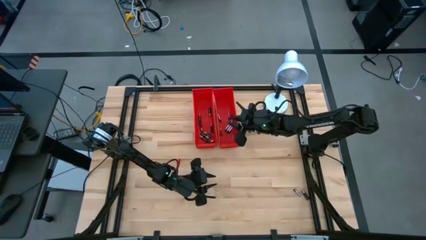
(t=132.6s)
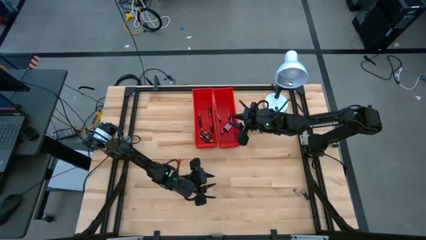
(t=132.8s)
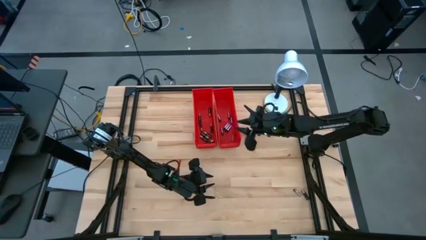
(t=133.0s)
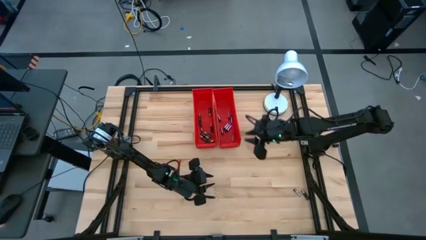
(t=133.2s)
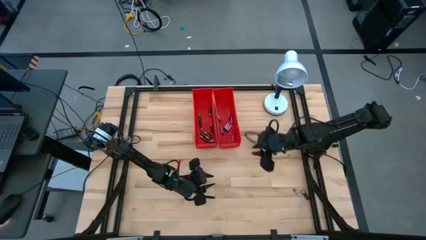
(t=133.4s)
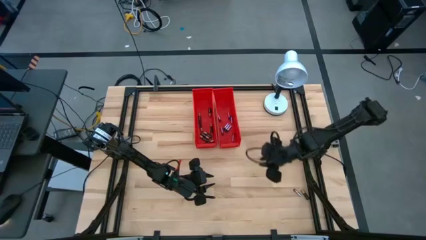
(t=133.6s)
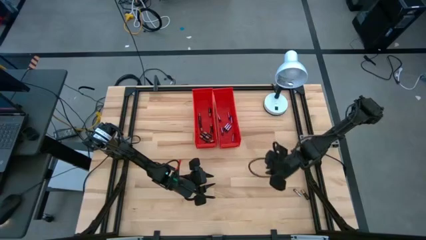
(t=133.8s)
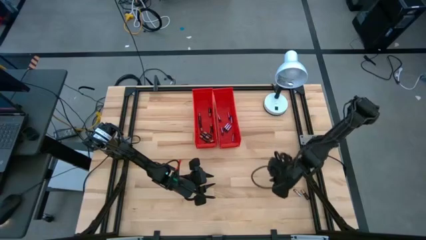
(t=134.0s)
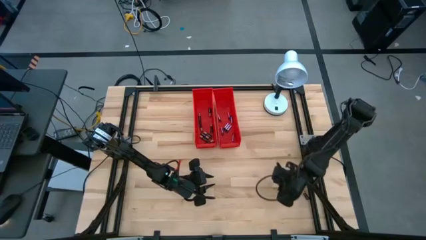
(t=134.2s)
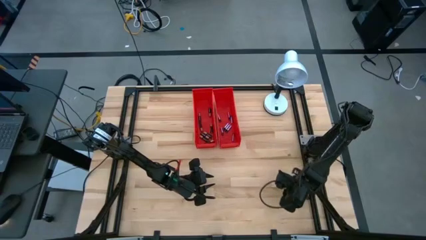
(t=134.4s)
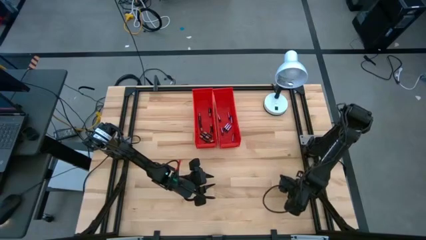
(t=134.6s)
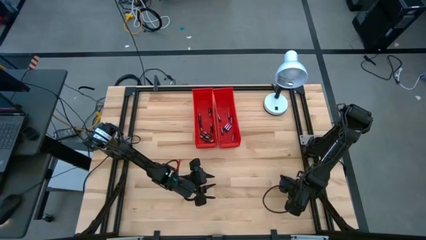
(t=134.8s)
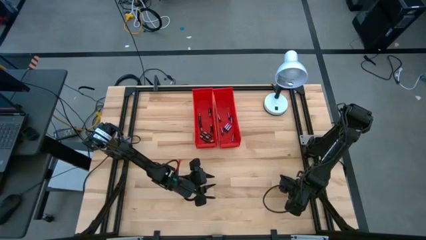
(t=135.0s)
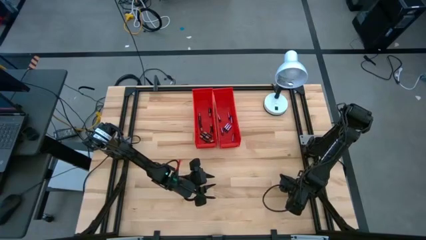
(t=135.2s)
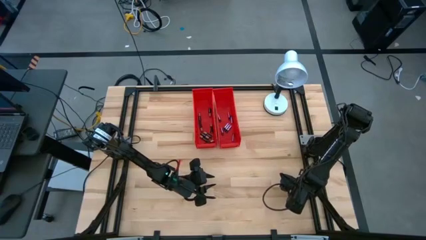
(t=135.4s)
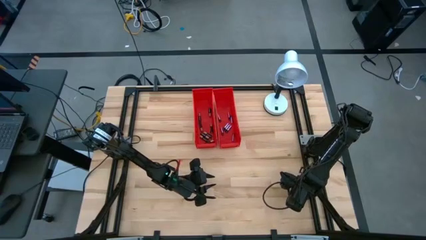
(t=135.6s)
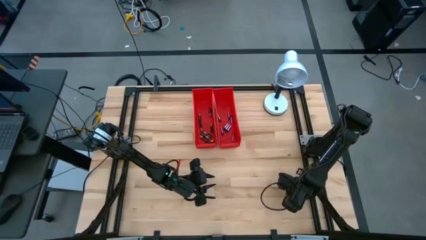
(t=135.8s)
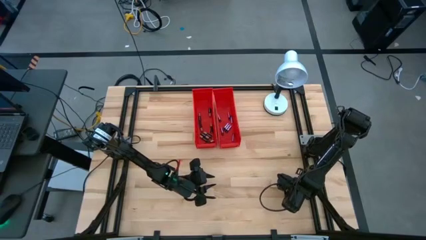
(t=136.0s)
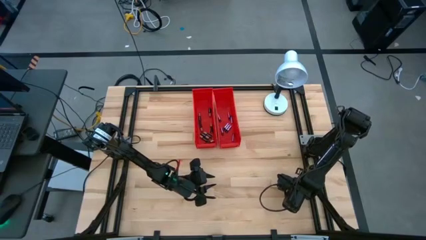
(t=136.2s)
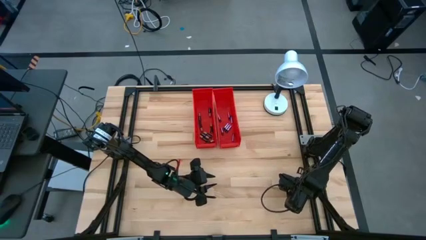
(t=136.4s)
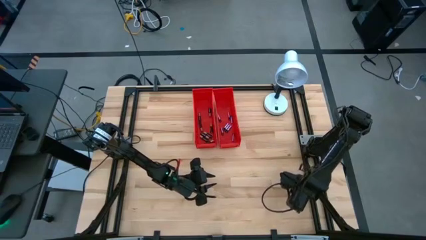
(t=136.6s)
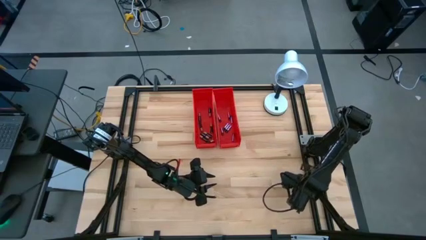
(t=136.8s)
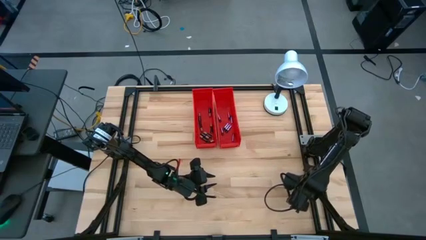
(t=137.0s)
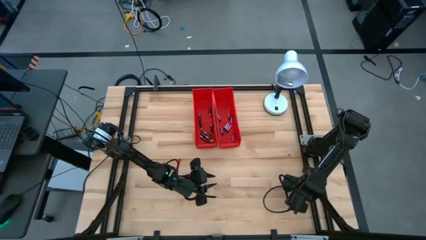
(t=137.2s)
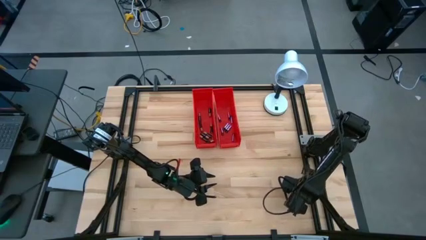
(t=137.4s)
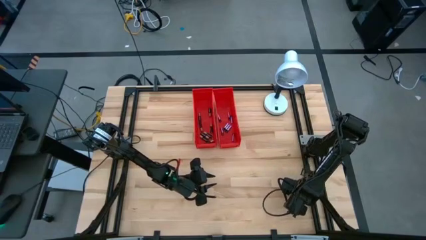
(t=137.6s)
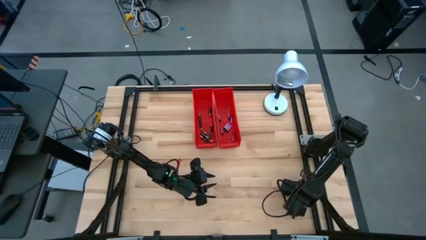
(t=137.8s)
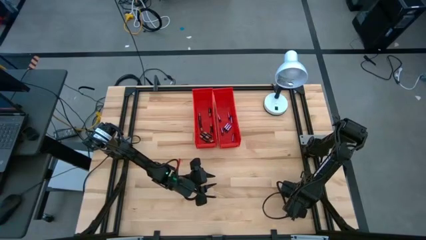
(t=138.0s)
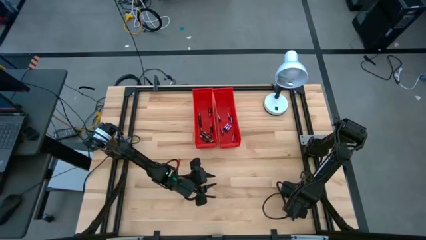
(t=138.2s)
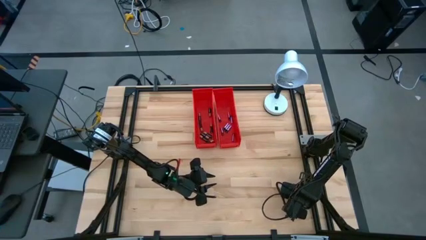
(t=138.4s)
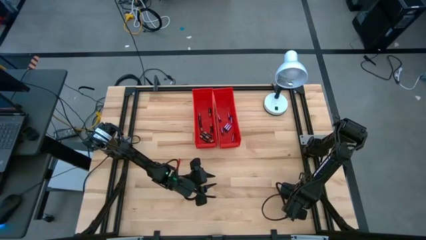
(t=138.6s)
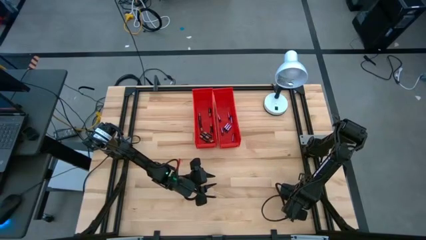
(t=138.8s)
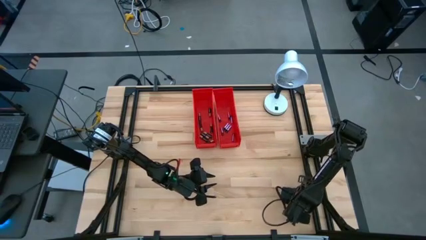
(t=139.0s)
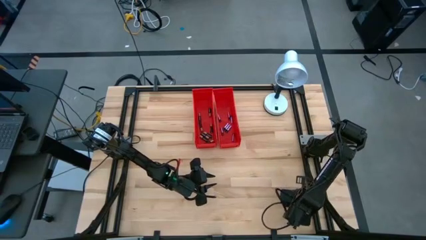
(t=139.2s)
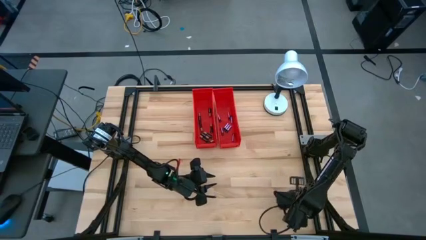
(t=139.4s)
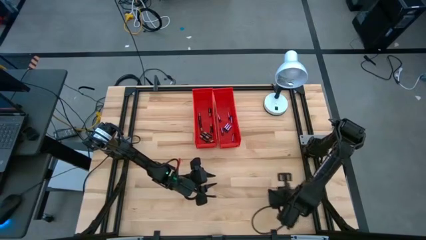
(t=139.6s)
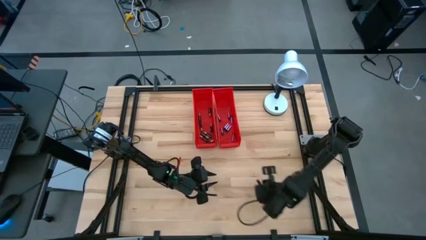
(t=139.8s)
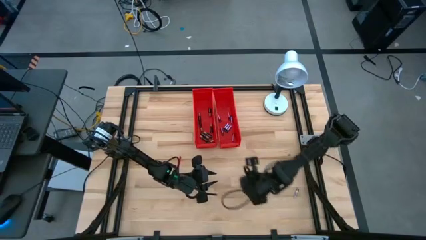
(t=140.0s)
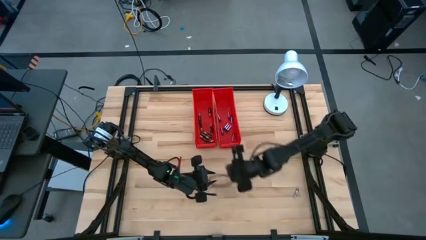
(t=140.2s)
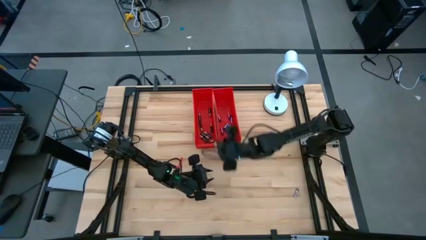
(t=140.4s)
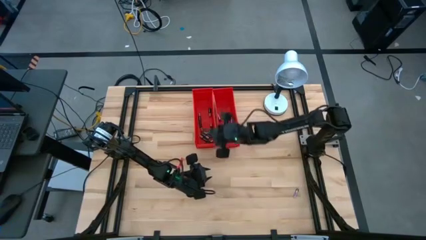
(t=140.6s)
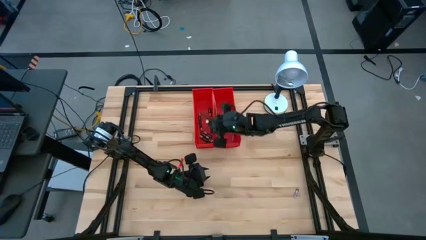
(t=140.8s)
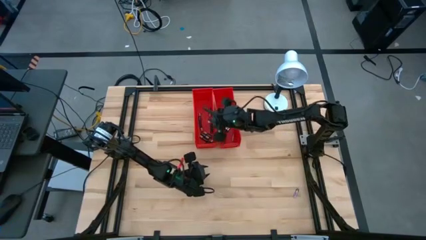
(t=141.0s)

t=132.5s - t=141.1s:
Task: Sort batteries
Put the black battery into the left red bin

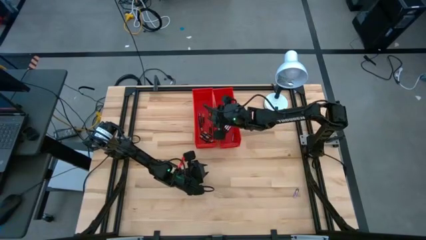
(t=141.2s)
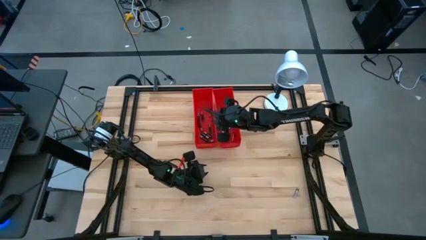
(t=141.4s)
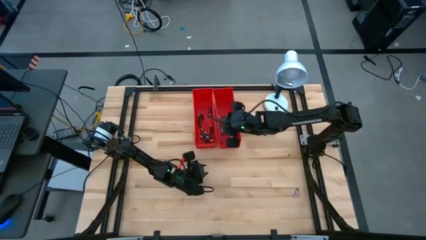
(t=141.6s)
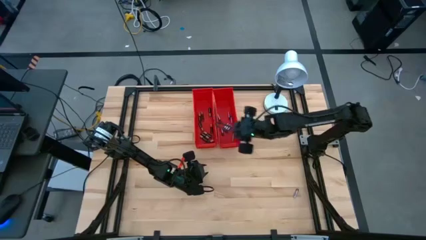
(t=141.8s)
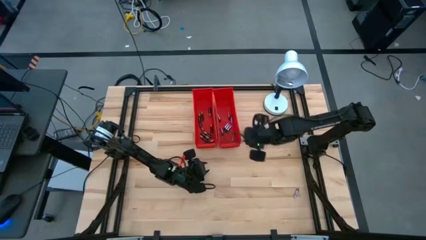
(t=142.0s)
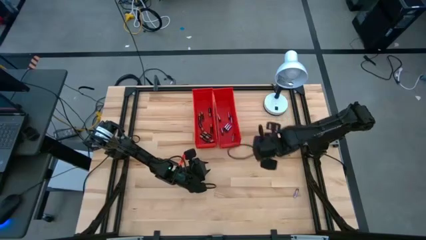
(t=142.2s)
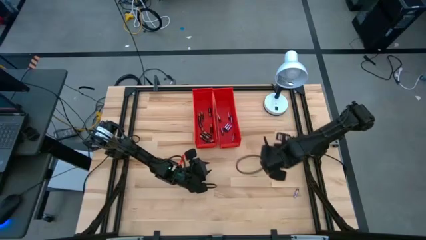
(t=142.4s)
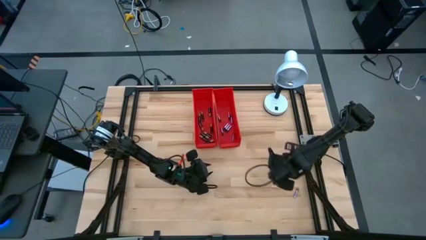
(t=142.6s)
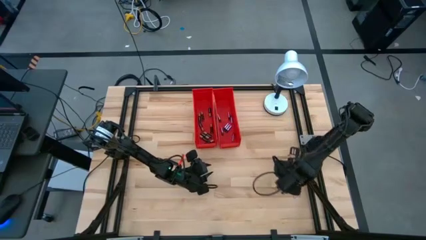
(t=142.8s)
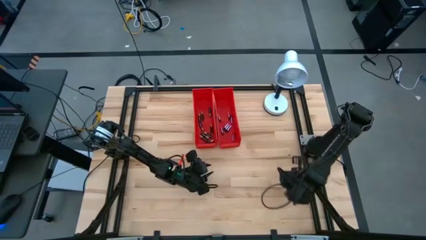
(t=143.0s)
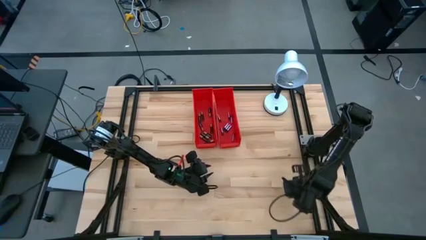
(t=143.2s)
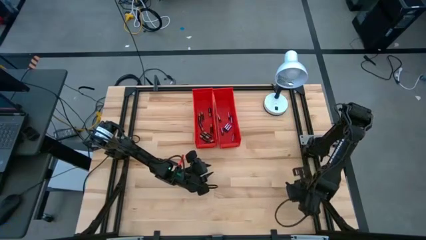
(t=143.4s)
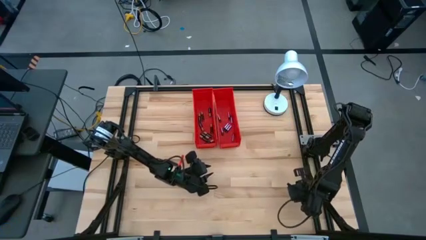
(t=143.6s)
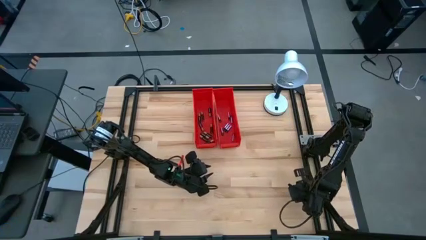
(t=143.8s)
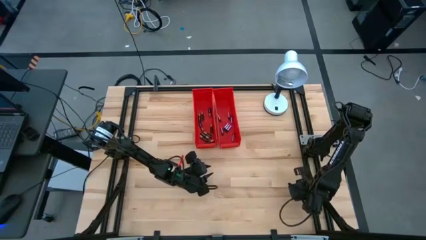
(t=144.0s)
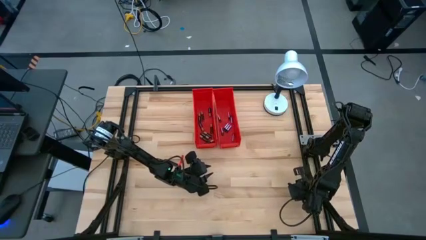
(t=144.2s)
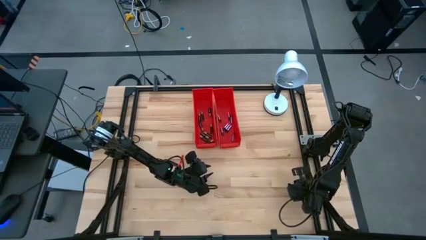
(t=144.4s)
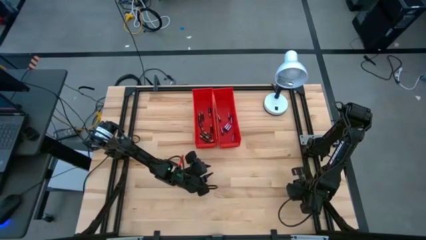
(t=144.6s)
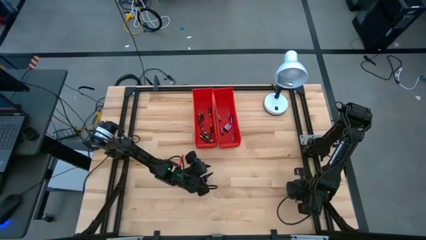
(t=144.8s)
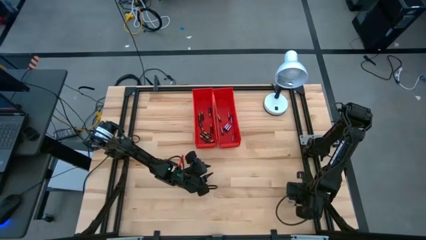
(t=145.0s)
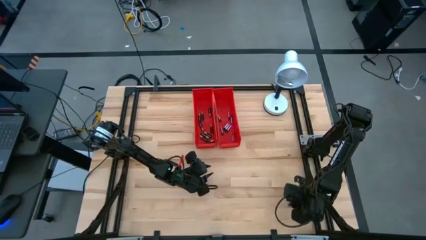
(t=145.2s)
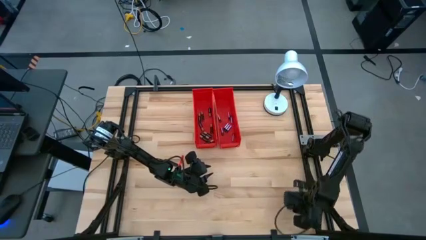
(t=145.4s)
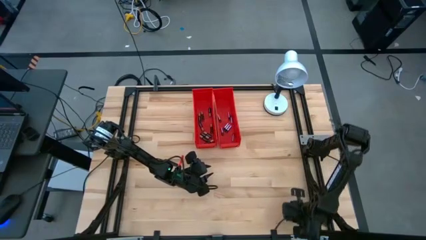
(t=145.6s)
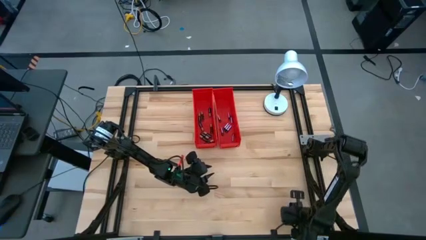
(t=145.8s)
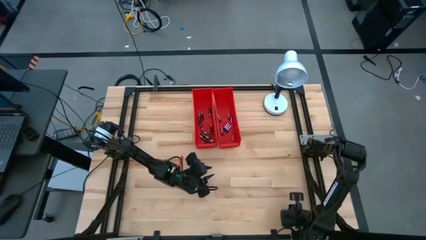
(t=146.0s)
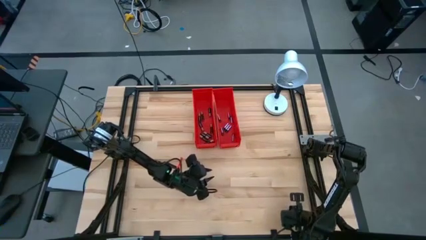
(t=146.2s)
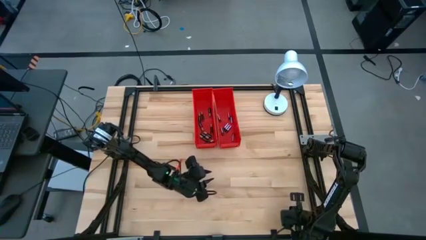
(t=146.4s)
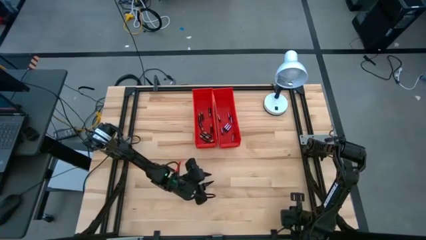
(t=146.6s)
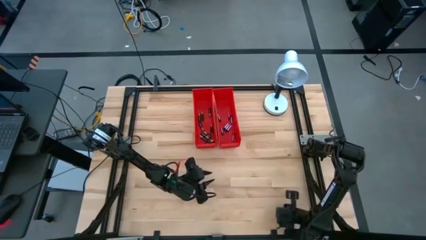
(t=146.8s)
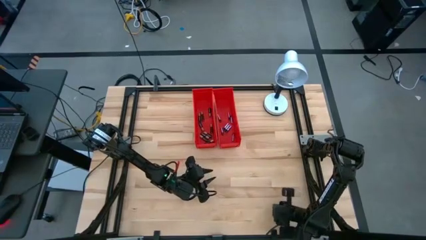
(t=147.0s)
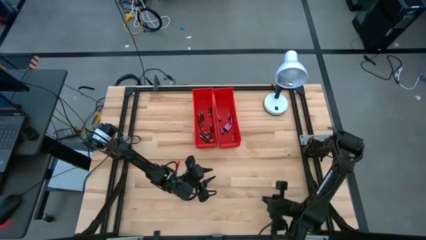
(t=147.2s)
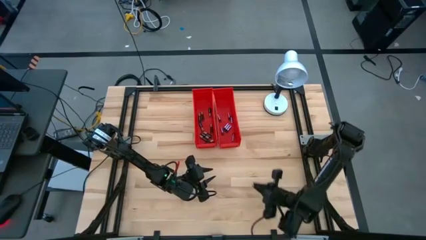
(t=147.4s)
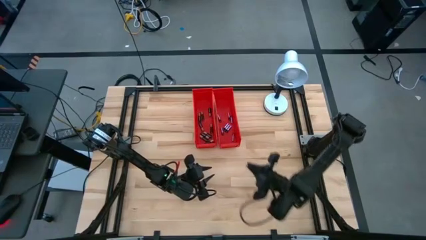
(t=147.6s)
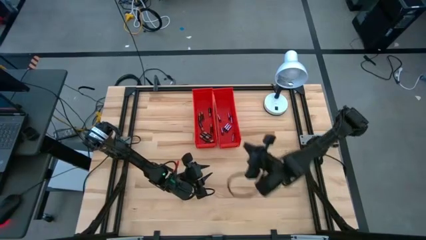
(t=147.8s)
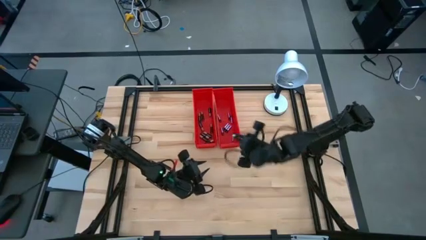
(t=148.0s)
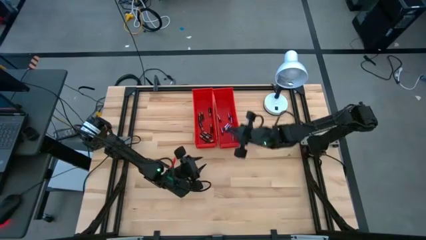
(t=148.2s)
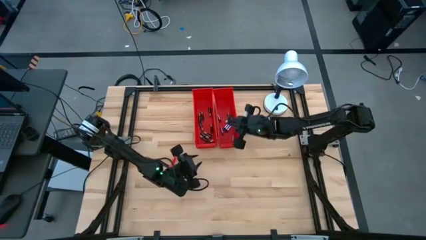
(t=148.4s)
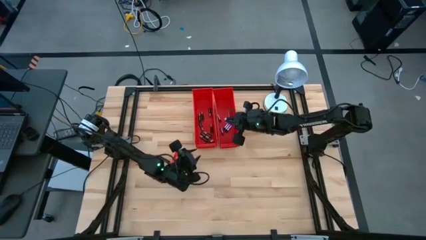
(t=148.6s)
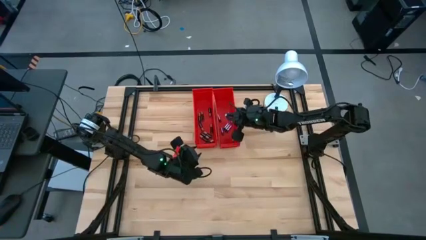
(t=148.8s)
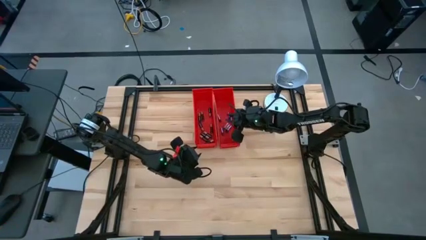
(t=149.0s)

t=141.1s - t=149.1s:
Put the silver battery into the right red bin
